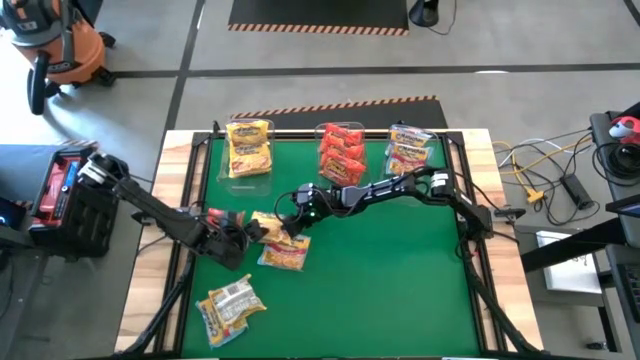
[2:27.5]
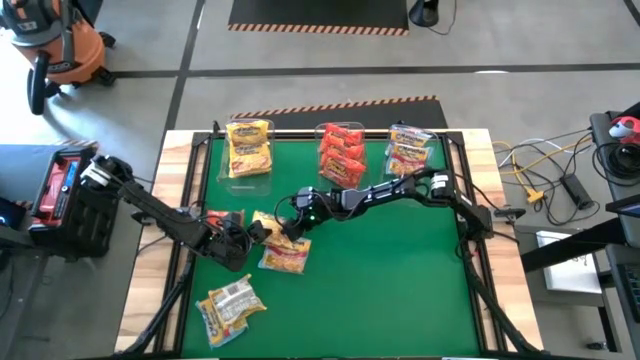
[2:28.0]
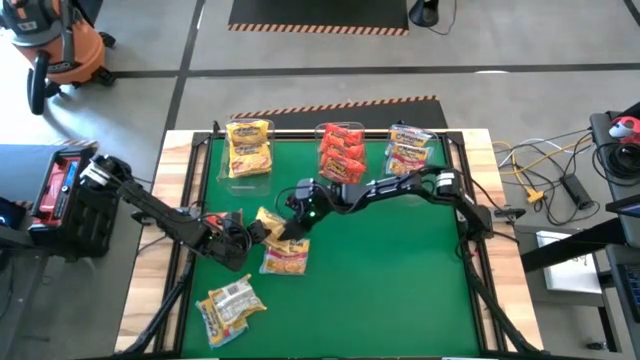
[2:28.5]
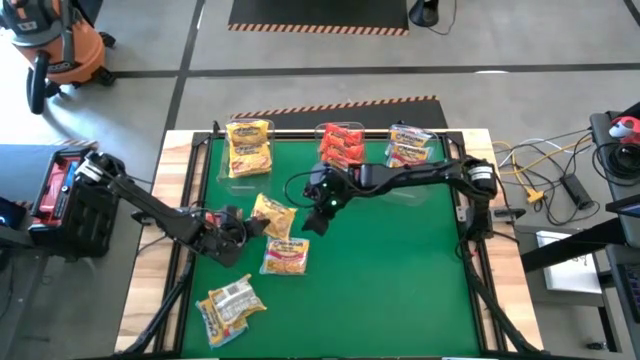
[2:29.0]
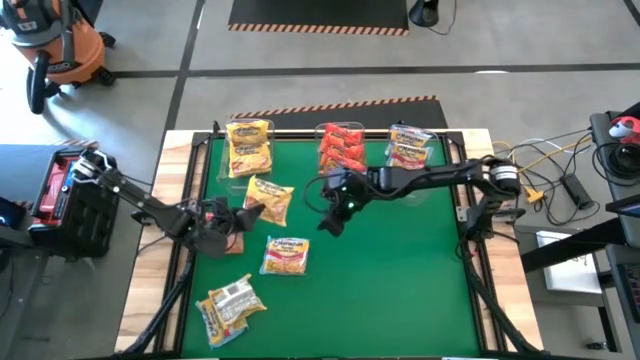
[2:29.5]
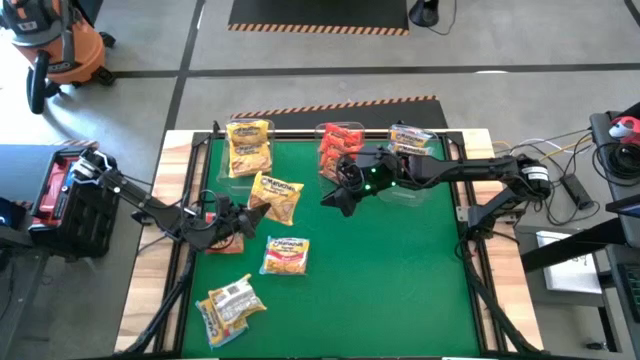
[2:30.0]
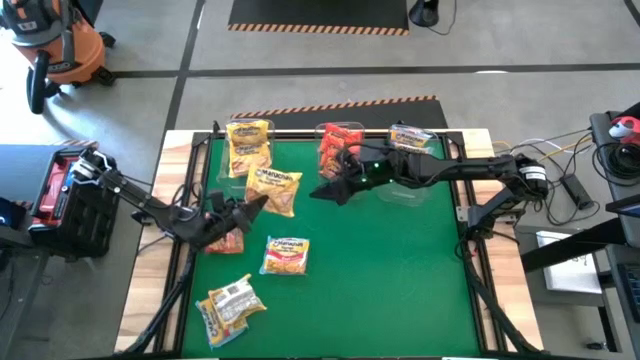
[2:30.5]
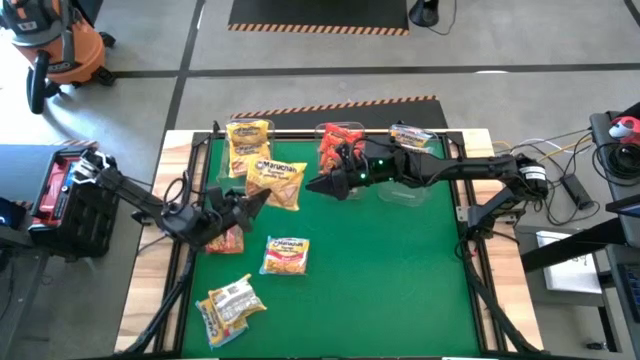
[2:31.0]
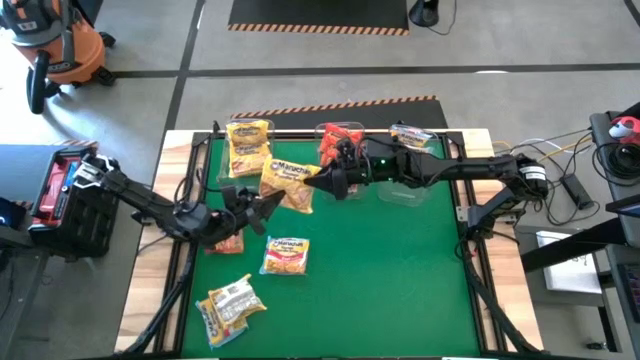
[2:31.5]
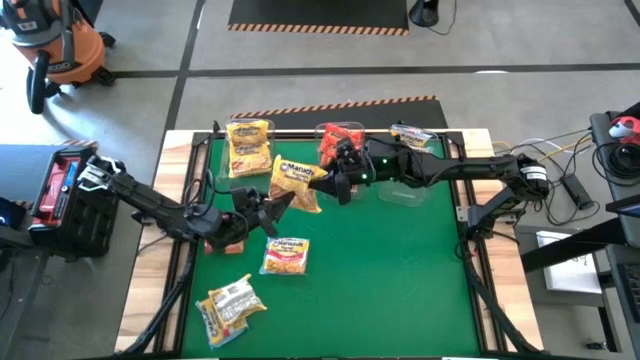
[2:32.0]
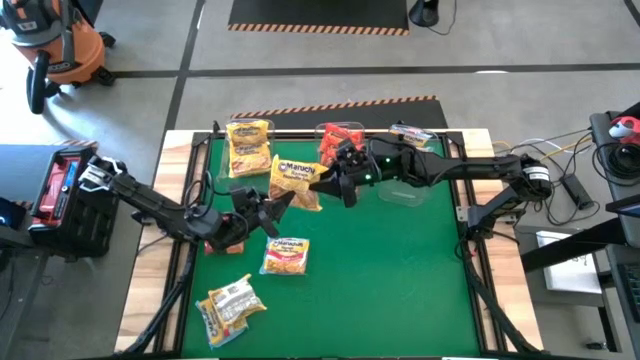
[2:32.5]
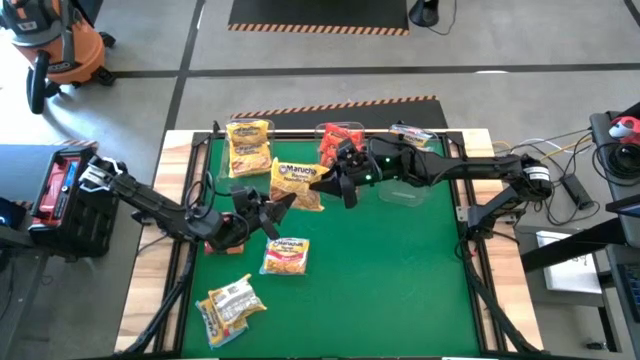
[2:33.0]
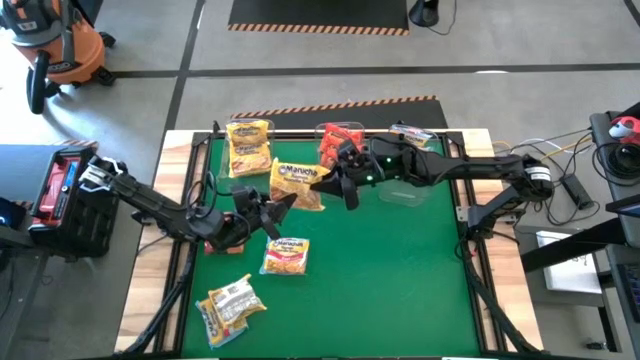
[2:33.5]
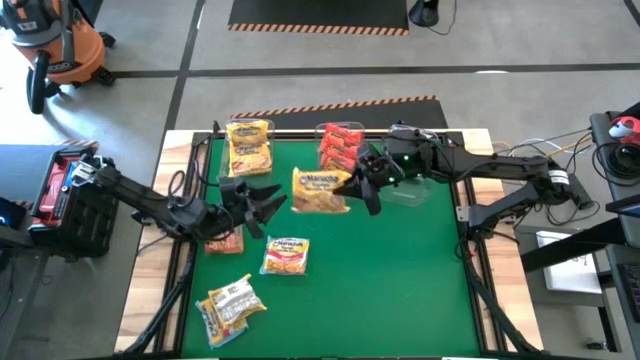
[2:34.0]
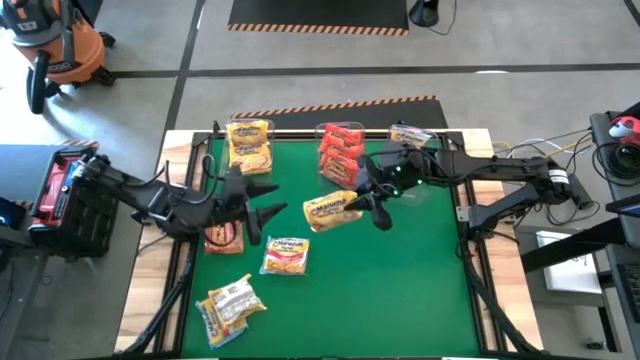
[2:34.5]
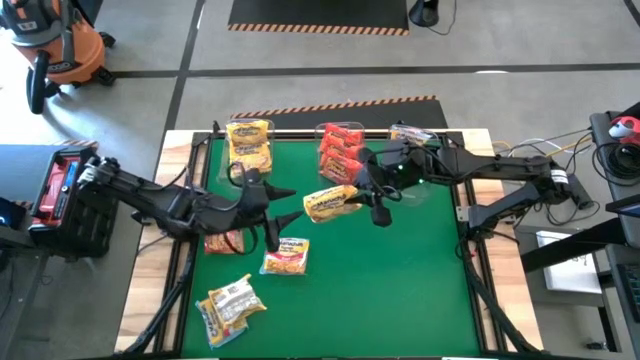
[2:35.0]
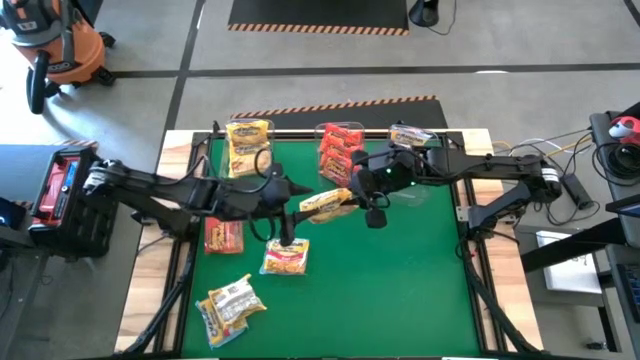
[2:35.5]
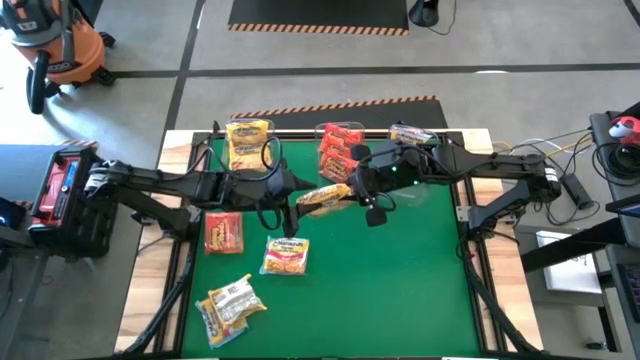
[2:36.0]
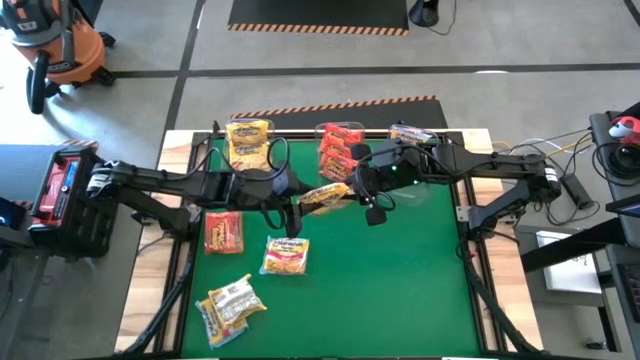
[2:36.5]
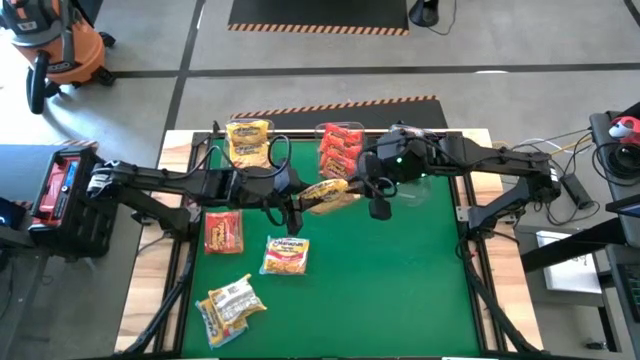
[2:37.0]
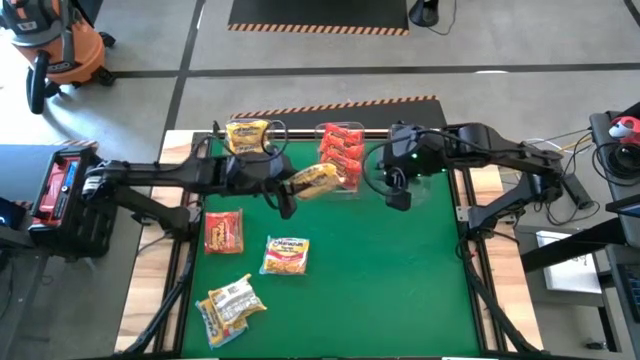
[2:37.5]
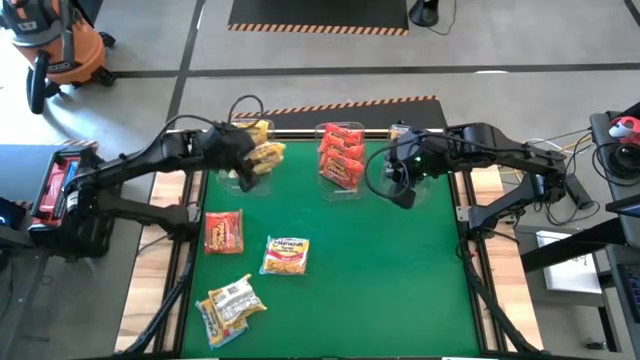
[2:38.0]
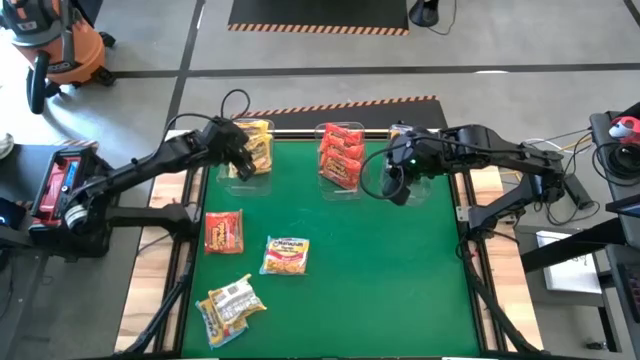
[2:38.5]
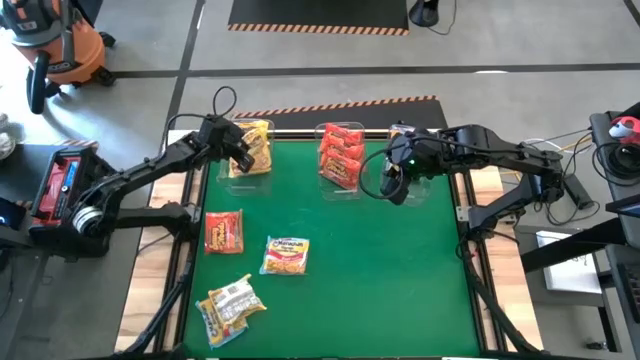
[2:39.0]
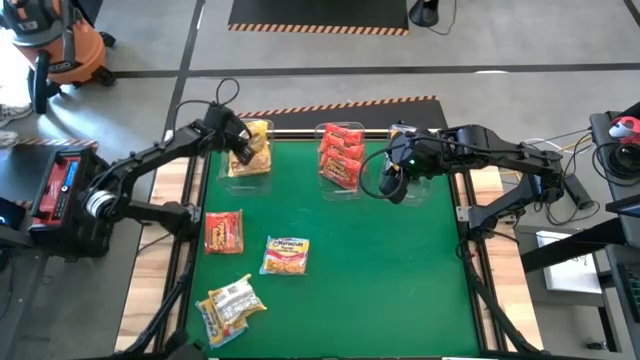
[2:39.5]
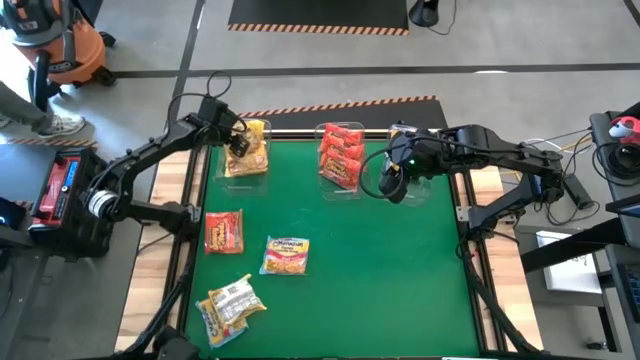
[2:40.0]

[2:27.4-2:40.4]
Task: Sort Maruchan noodles
Put the yellow noodle pack into the left transparent bin

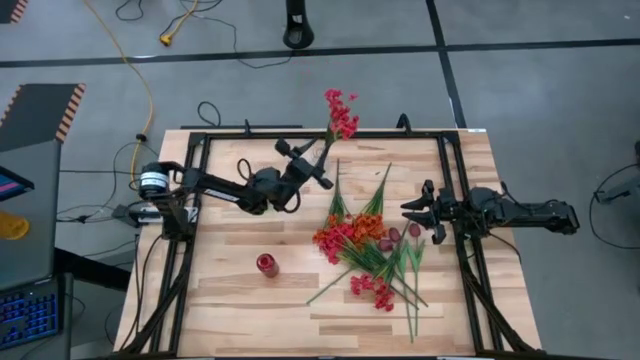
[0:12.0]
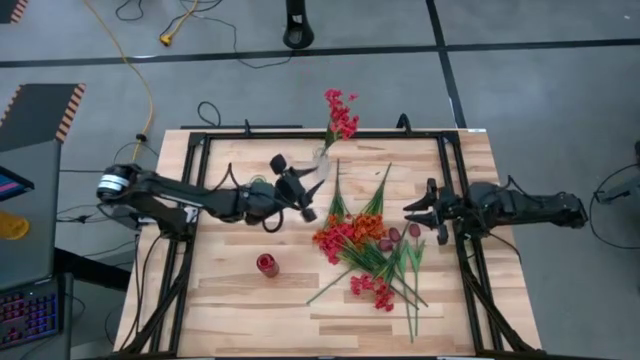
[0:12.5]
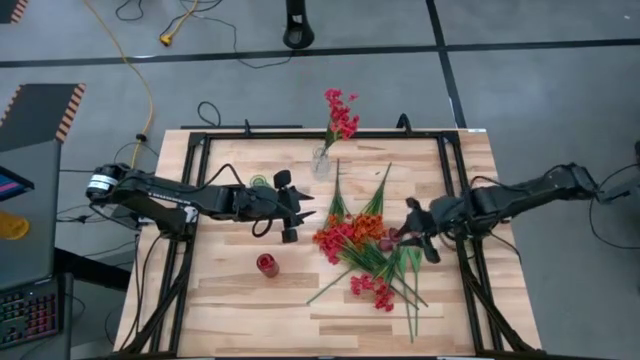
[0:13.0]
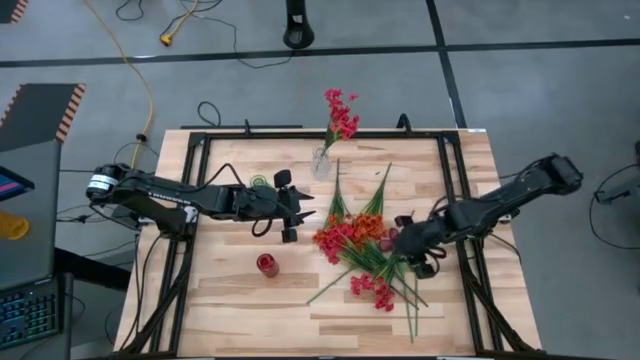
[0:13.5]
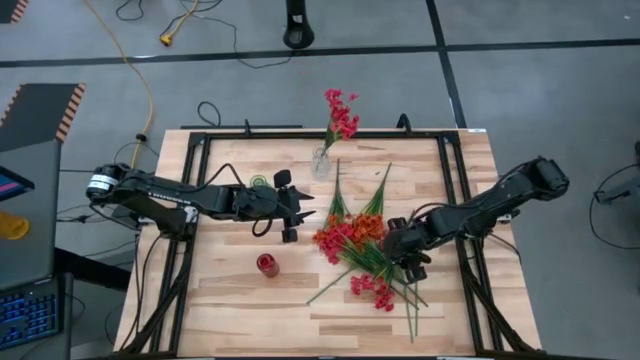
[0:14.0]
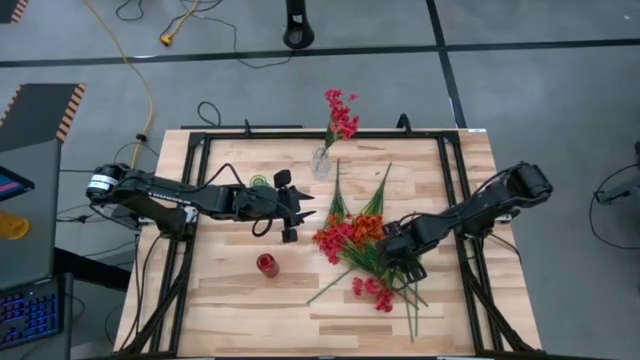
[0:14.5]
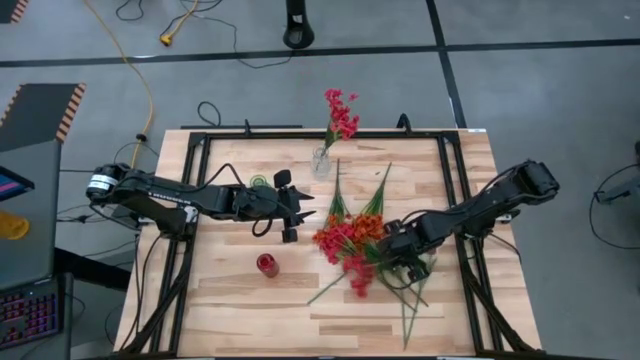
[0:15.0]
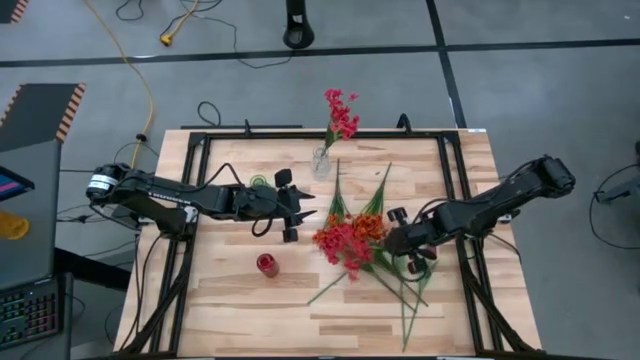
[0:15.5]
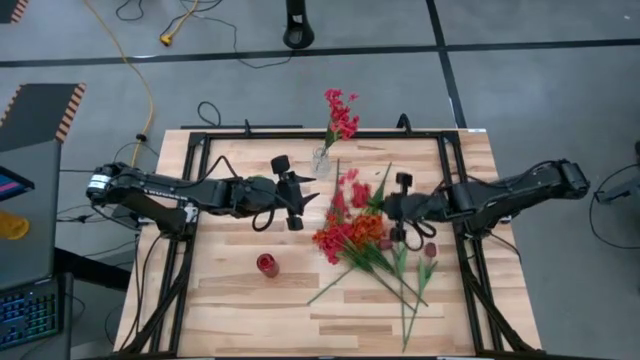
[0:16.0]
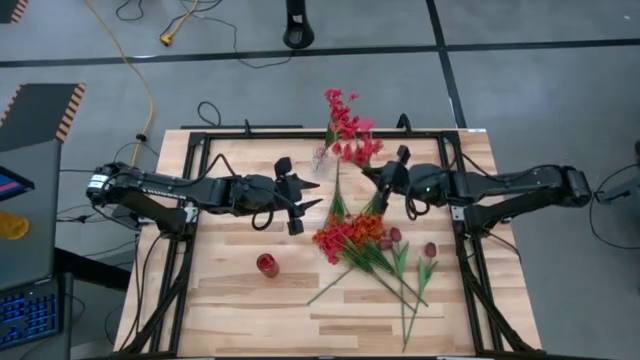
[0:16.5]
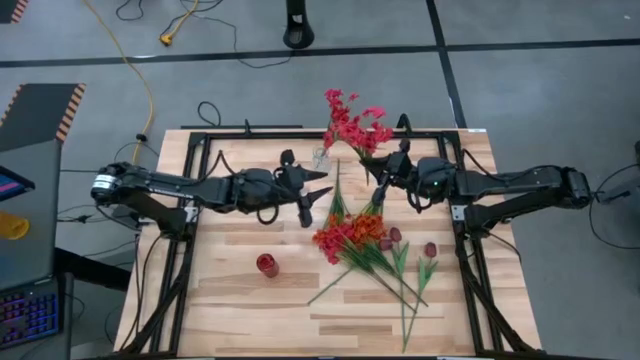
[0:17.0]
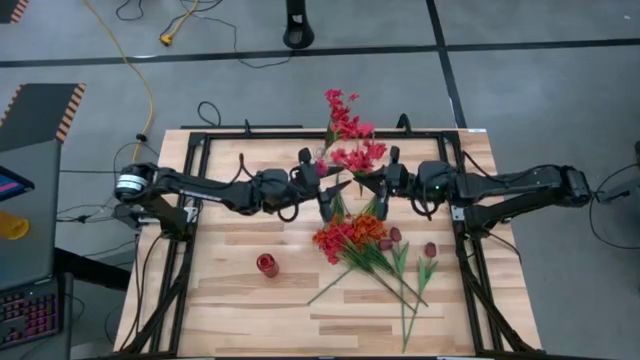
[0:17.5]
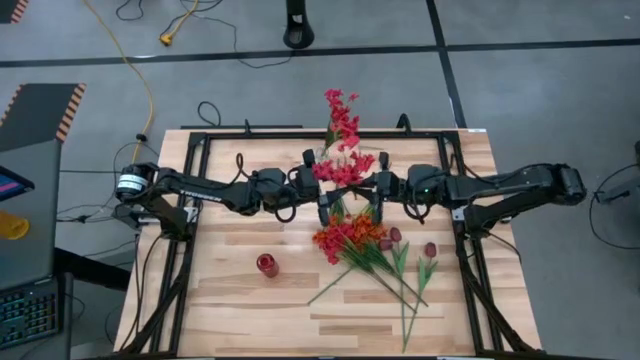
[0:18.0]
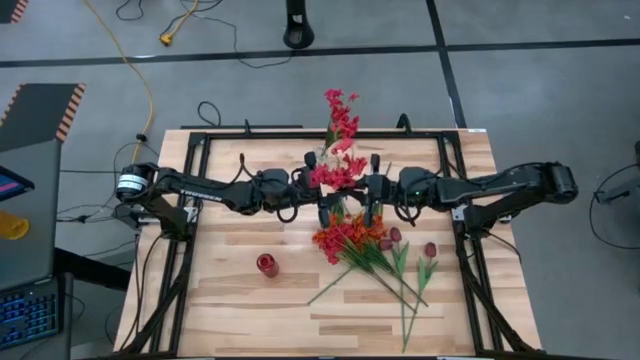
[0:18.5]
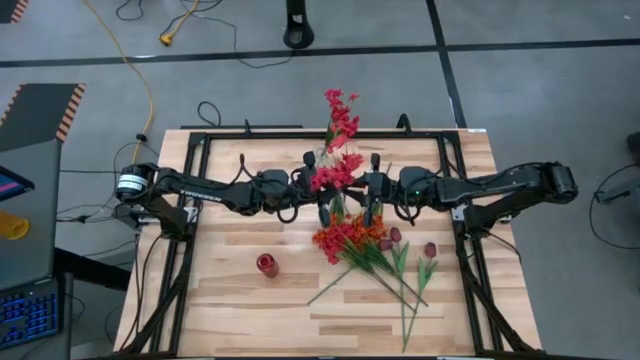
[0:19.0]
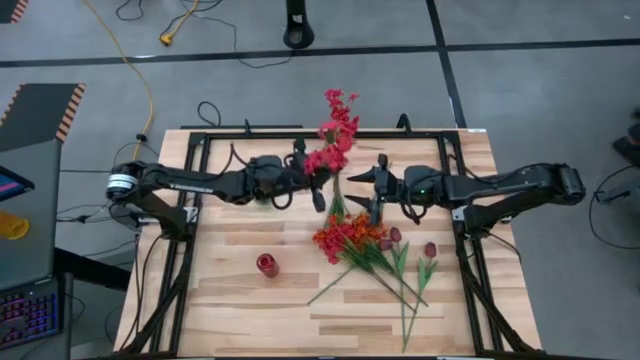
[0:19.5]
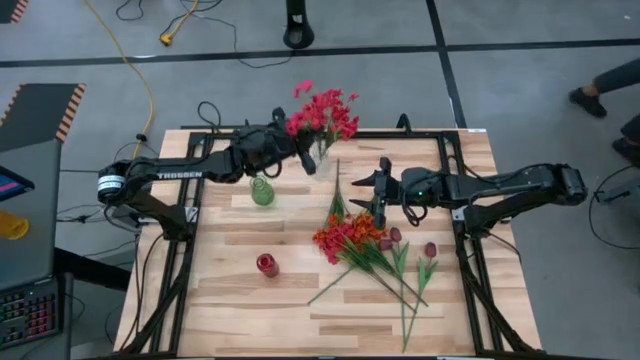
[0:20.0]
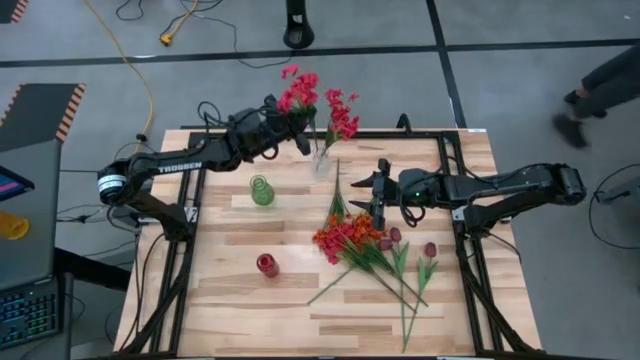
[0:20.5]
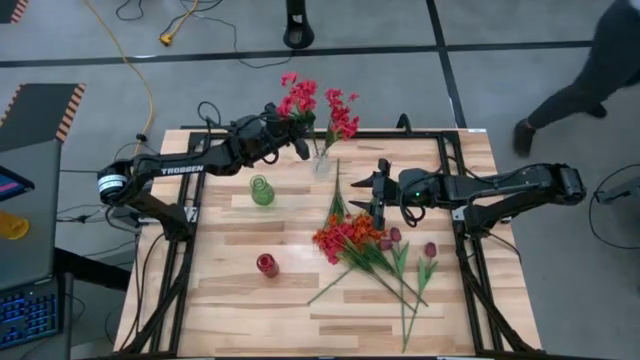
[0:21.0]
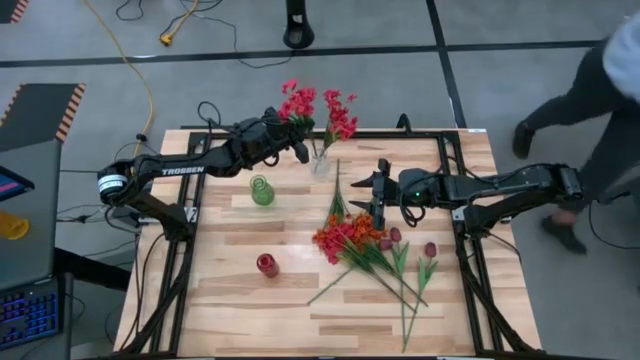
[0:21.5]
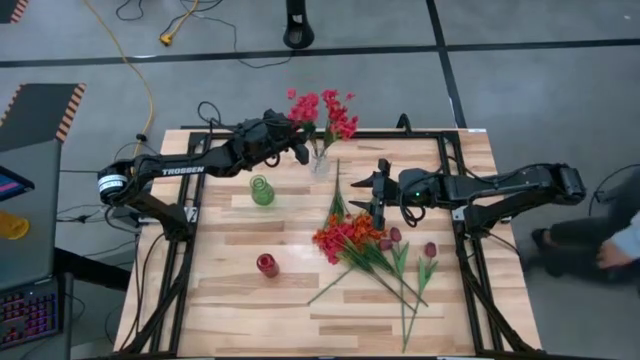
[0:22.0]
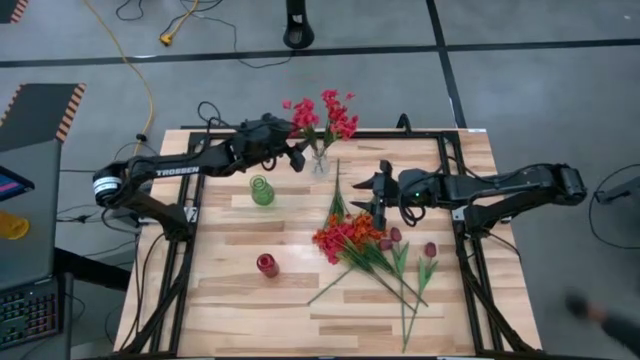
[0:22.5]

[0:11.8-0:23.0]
Task: Sort flowers into vase by color
Put the right red flower into the vase
